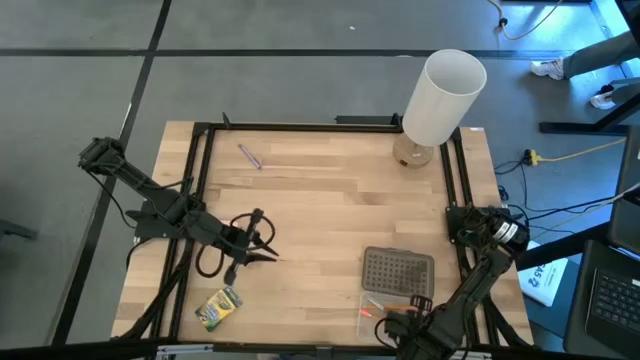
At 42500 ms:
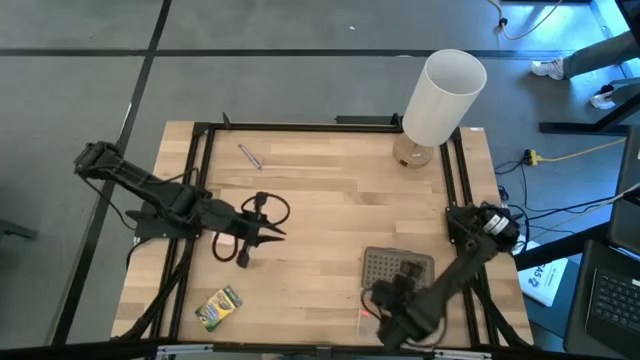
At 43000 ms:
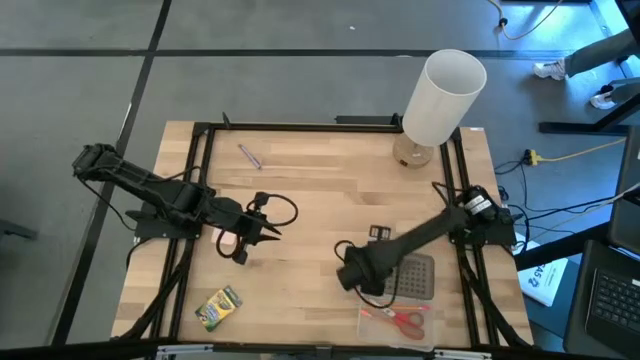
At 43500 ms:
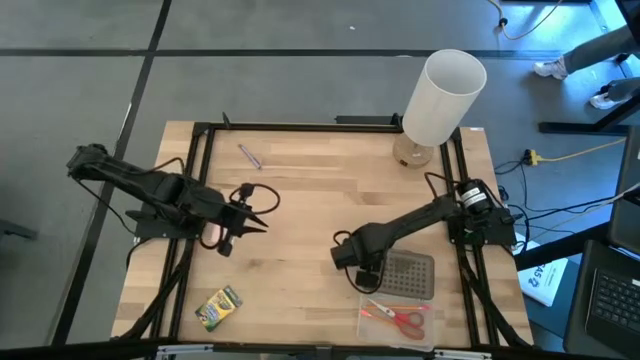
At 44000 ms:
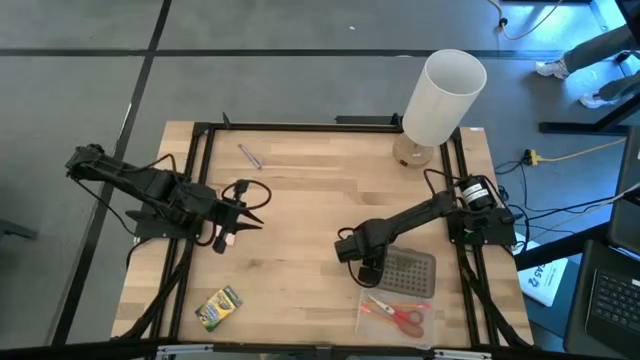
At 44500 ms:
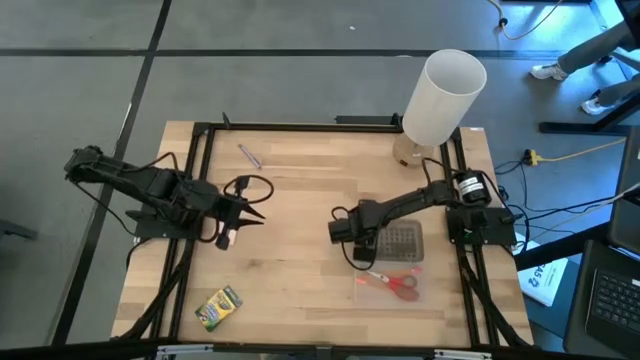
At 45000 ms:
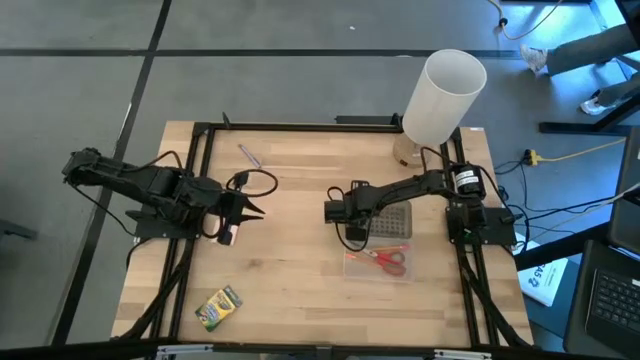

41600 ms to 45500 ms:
Task: Pack school essentials
Move the school supply box

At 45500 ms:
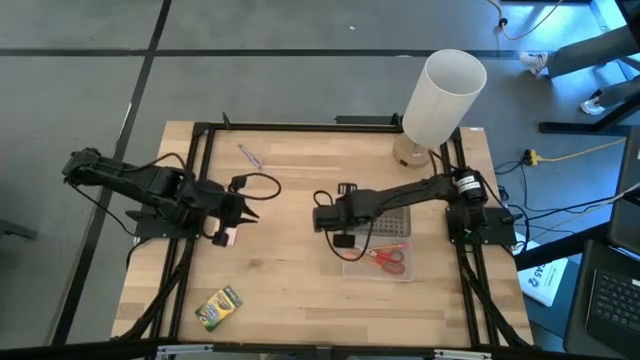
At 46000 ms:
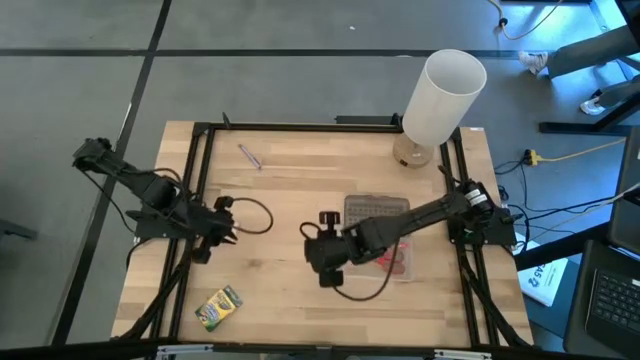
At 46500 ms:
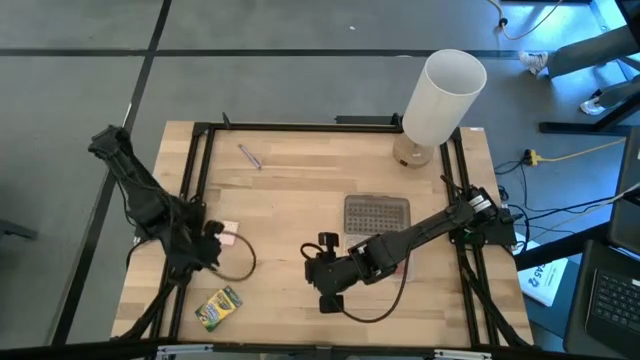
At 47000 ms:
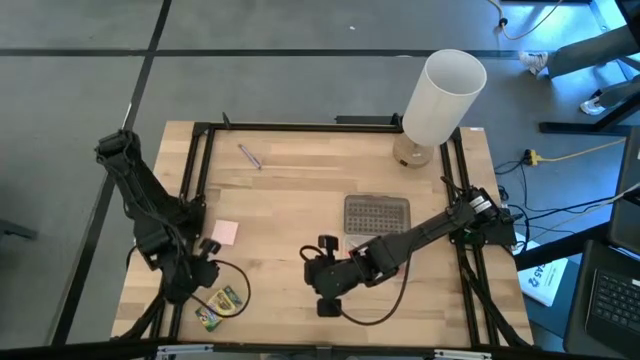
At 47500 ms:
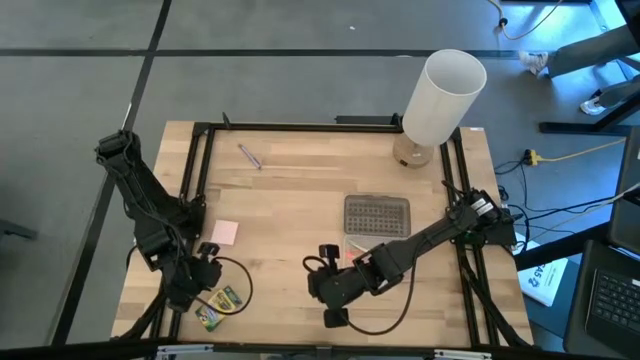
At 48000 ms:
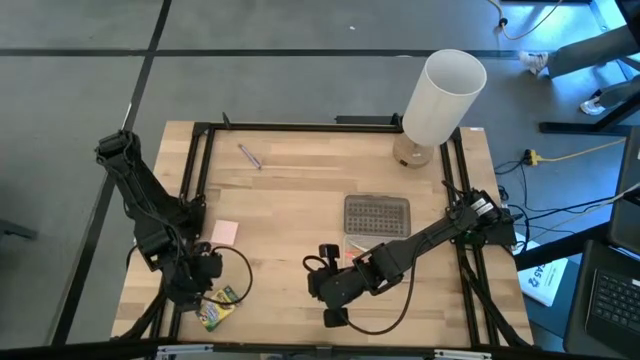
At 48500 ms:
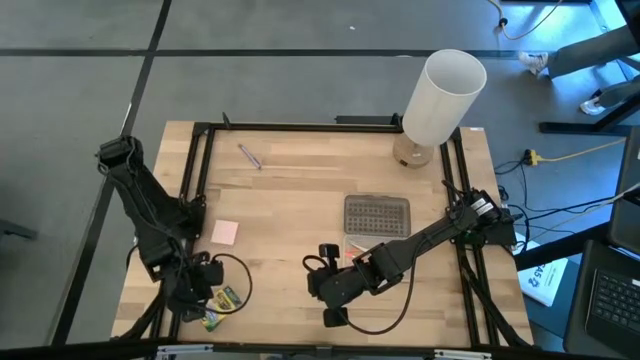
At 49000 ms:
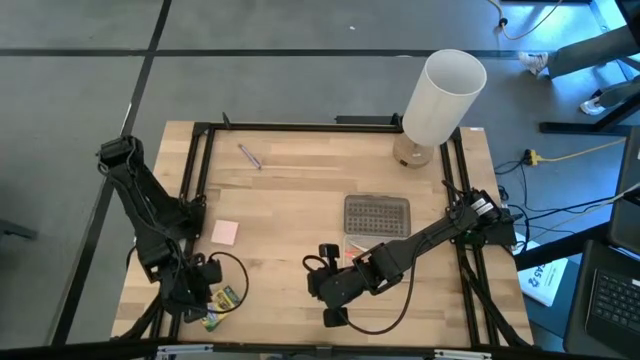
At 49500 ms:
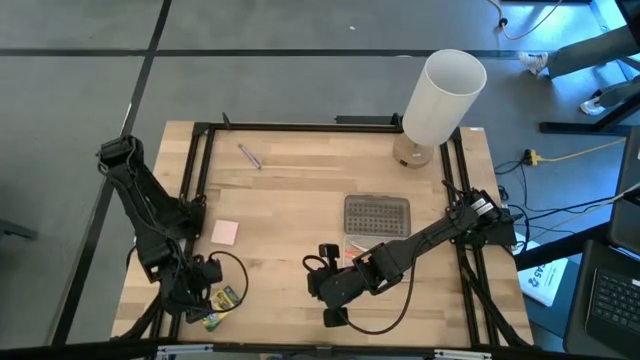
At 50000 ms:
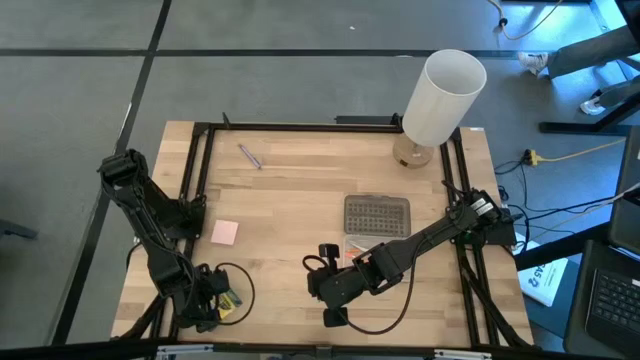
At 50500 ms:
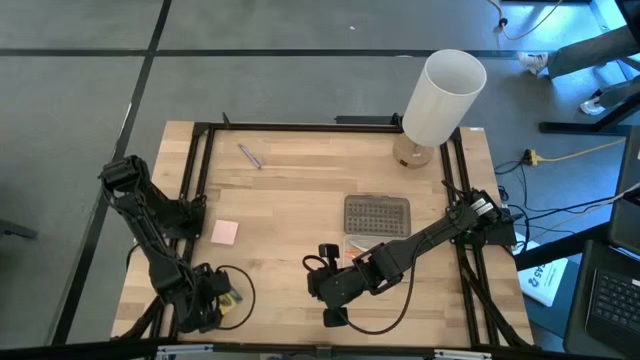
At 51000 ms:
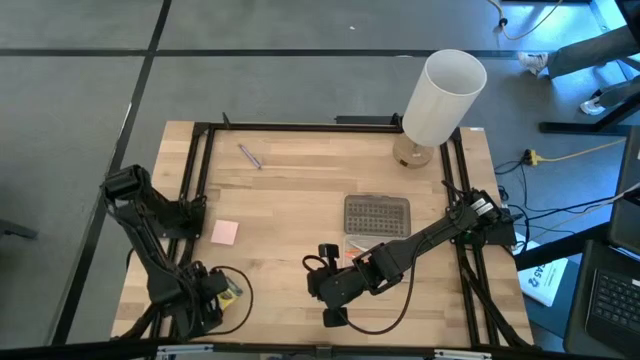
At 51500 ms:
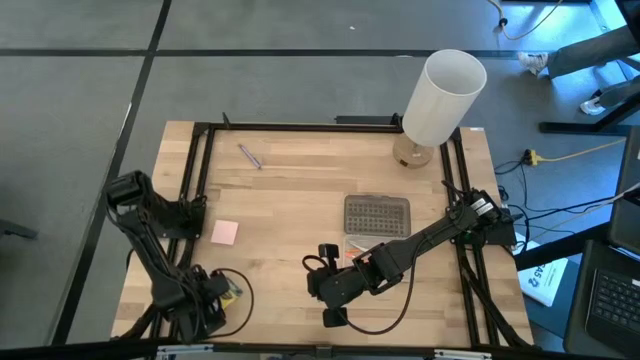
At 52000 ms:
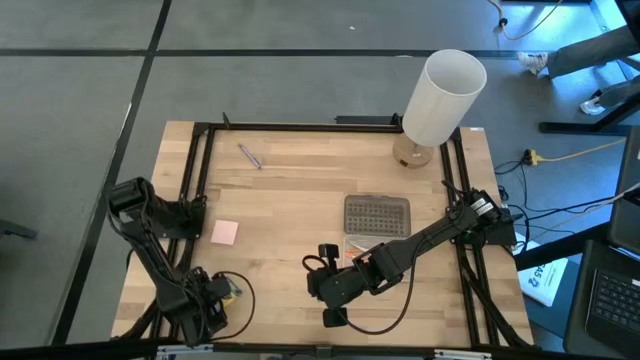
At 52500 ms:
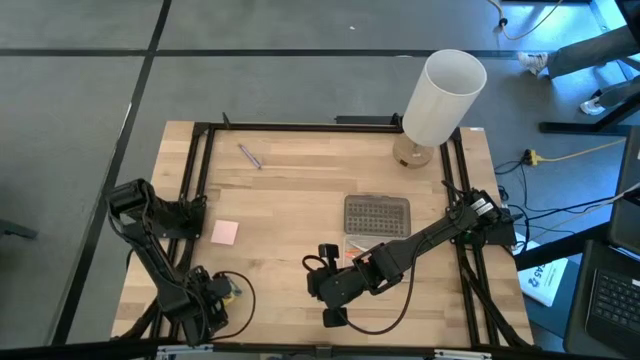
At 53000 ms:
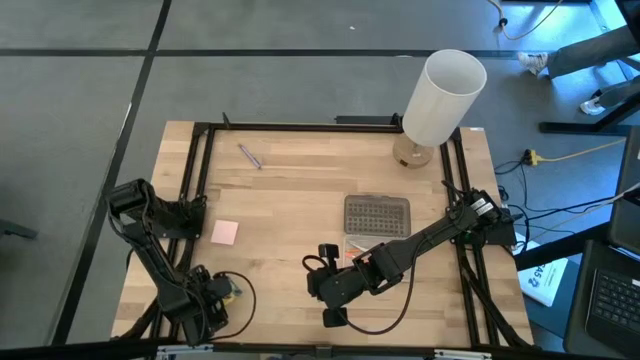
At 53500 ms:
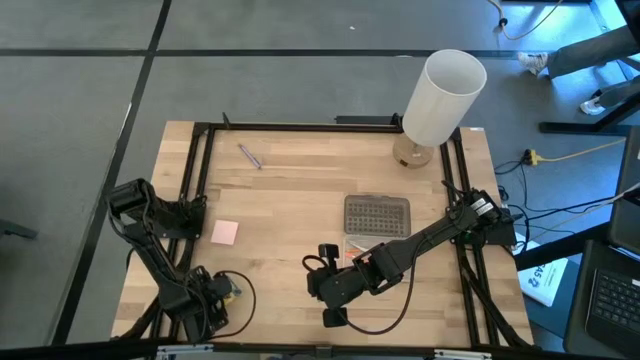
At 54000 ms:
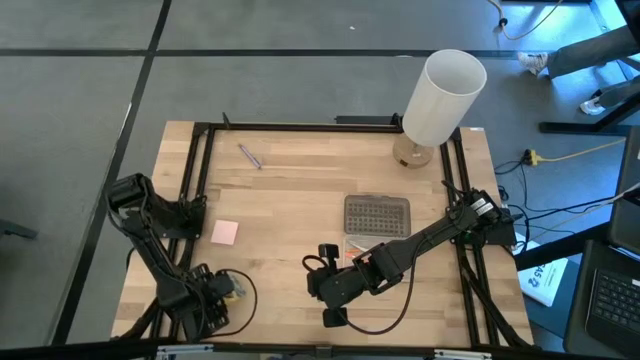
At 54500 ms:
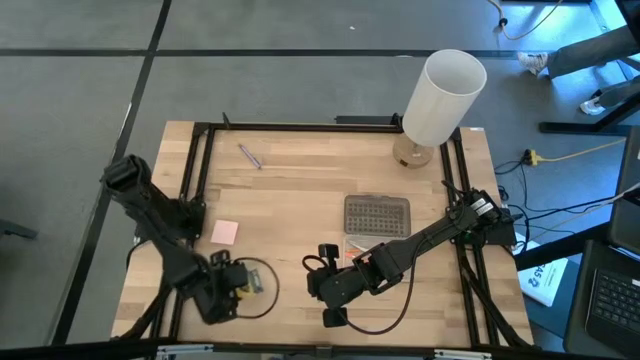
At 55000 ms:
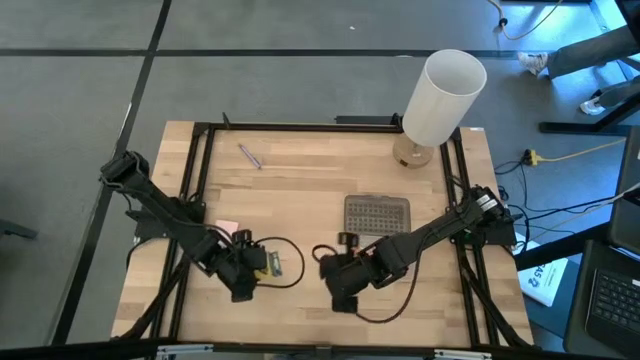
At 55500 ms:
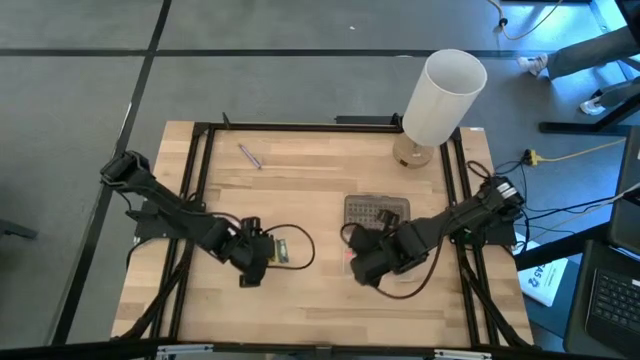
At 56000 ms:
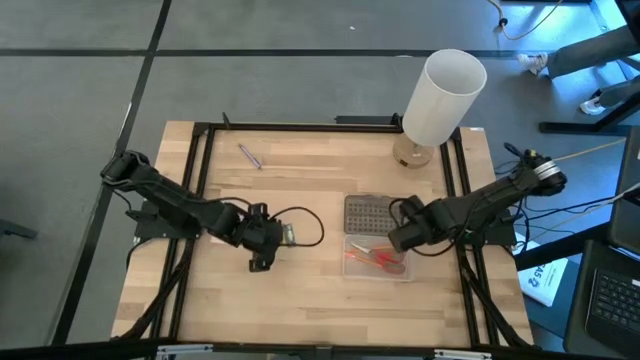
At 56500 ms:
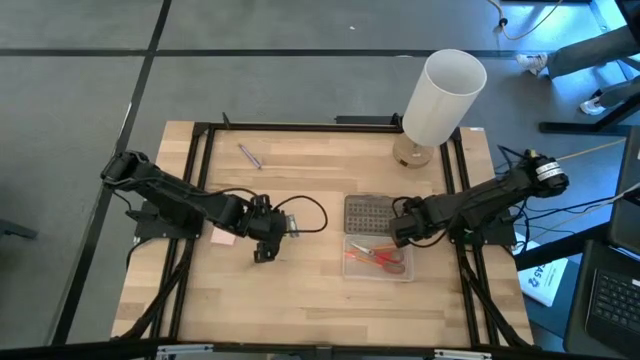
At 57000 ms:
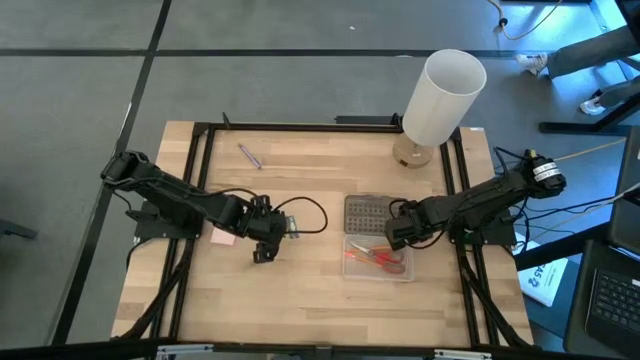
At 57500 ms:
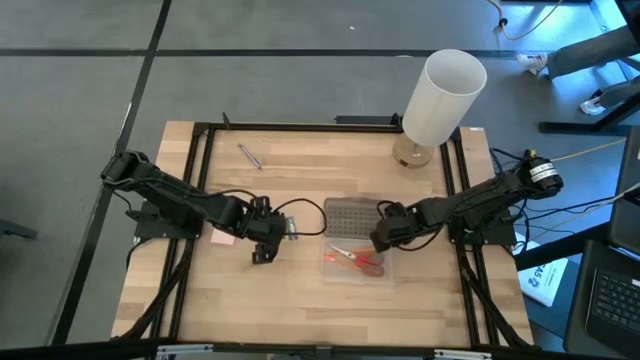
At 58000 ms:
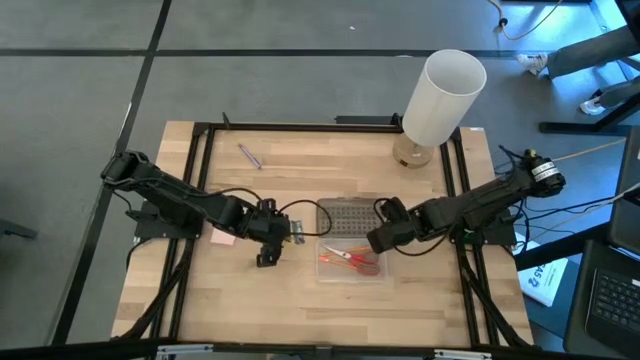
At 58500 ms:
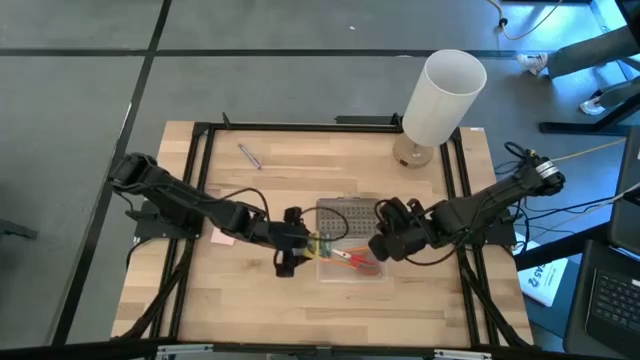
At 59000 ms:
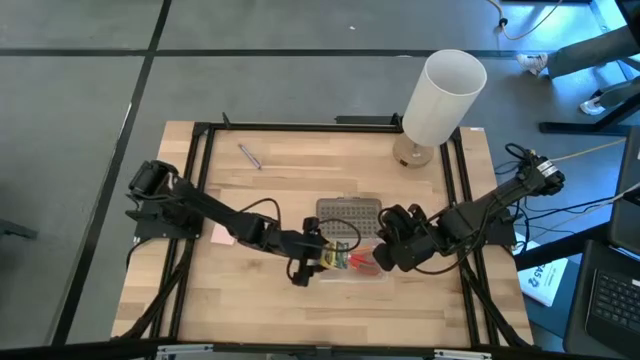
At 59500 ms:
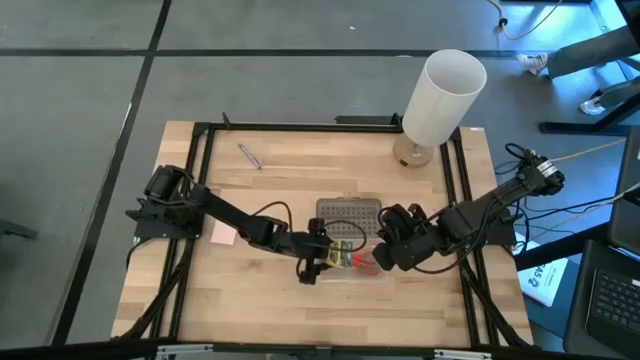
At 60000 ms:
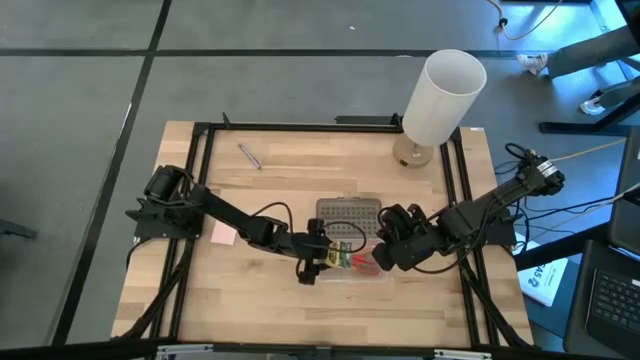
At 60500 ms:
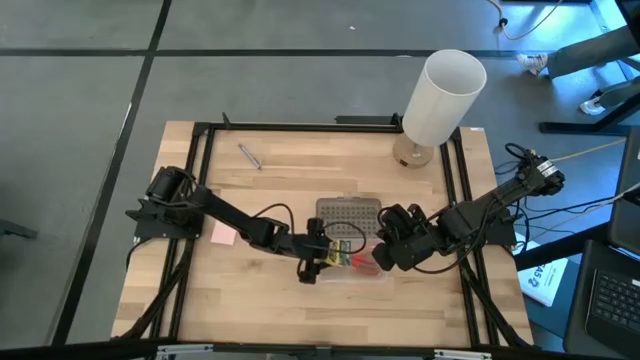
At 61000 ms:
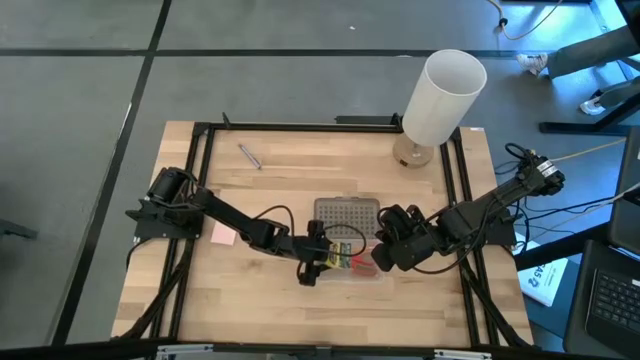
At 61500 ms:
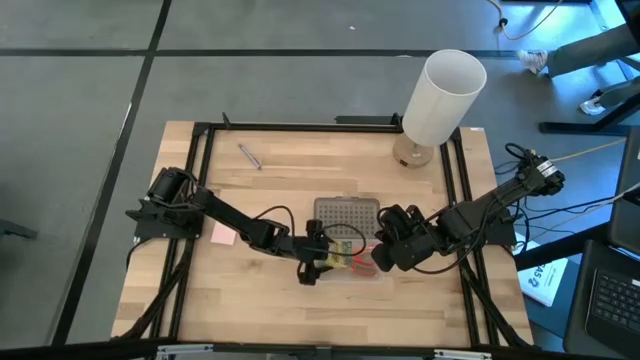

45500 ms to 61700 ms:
Put the crayon box into the supply box

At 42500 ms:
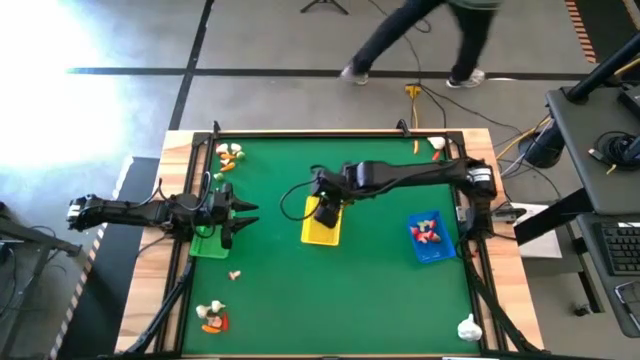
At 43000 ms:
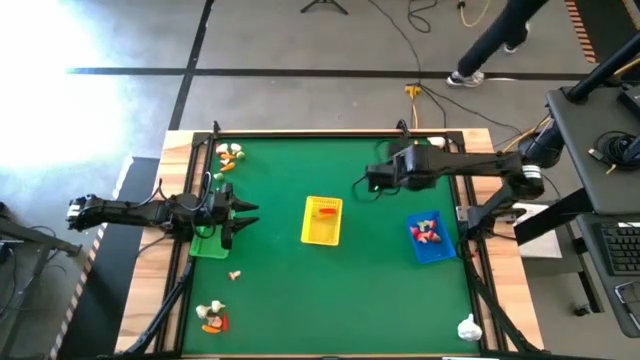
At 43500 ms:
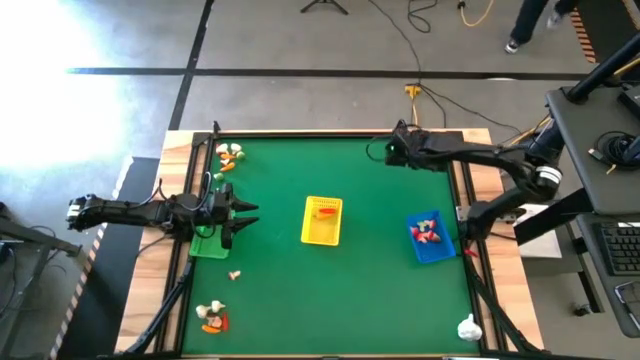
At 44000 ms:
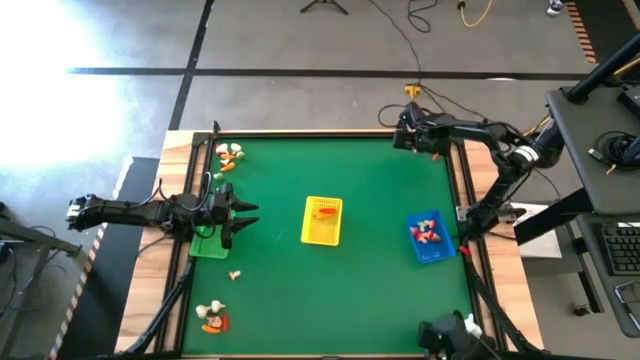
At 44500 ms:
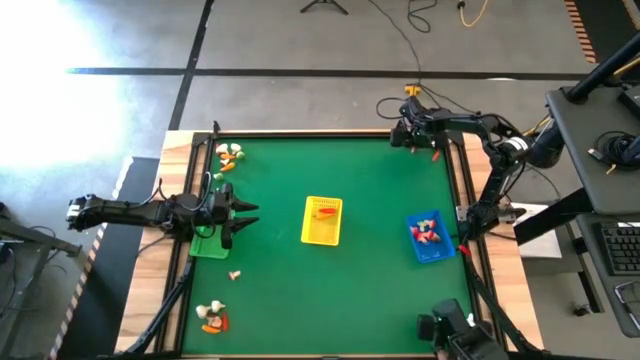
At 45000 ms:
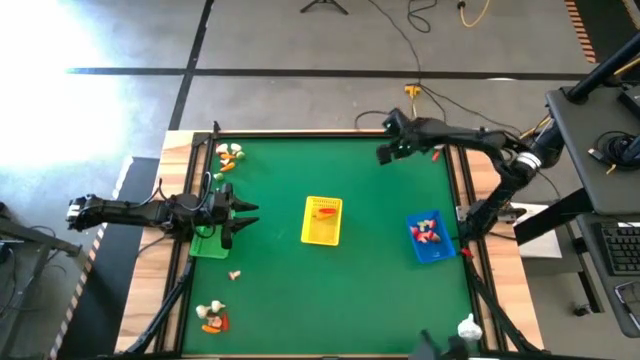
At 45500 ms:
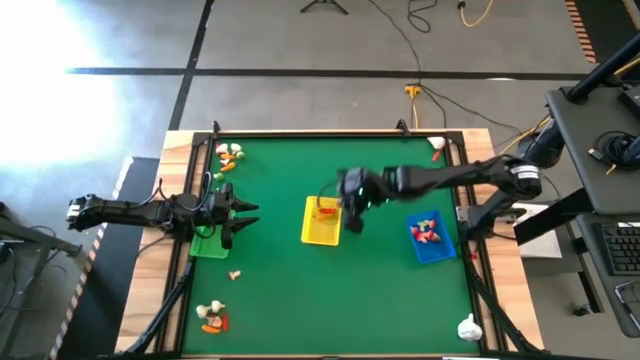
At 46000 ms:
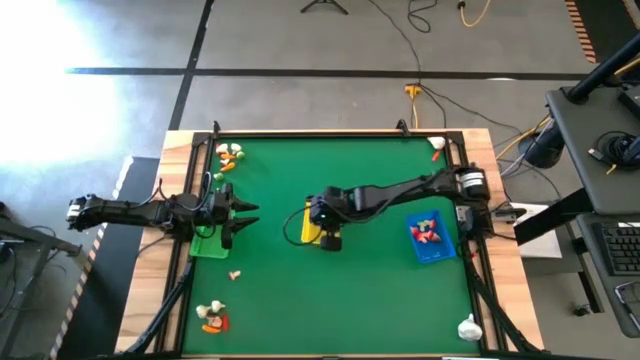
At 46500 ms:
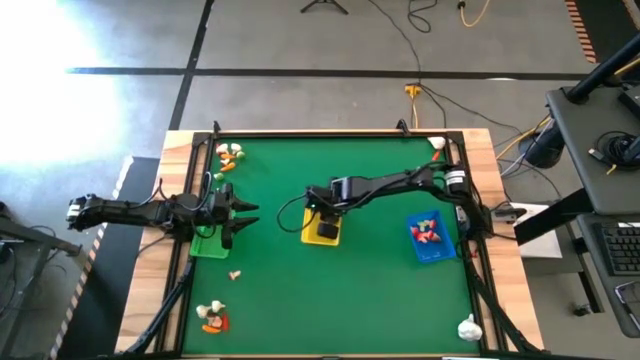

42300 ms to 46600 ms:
Task: Sort produce into baskets
Put the yellow chili pepper into the yellow bin
